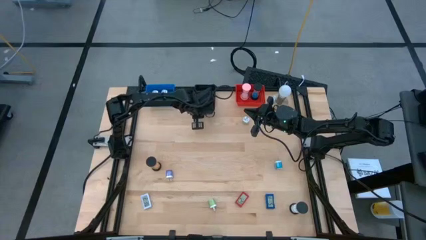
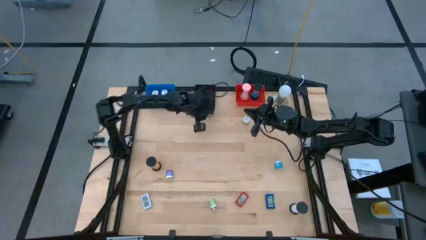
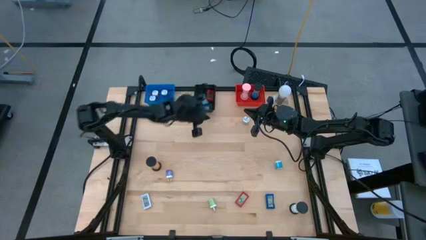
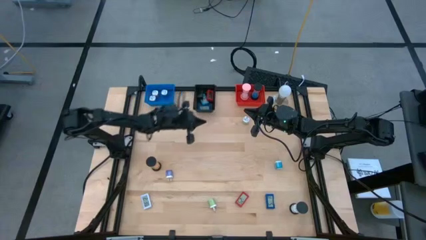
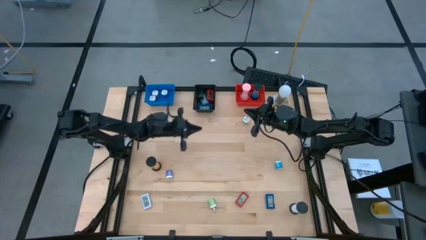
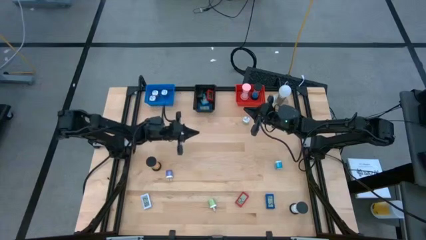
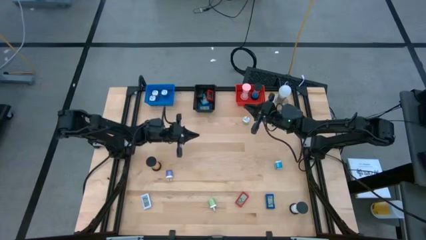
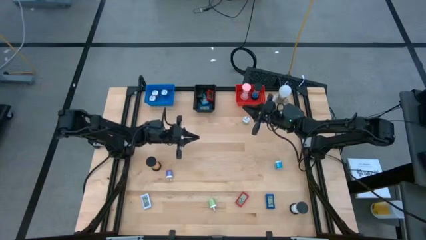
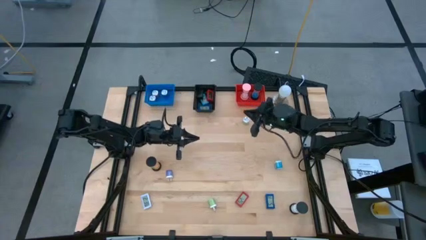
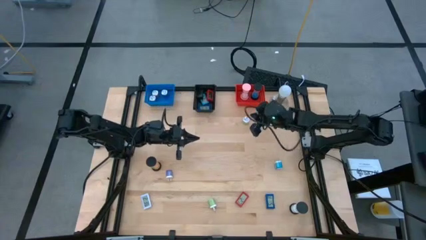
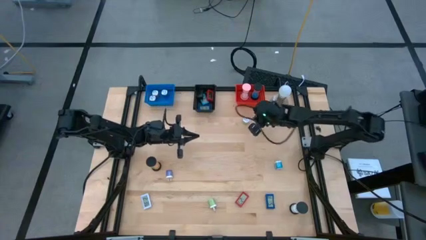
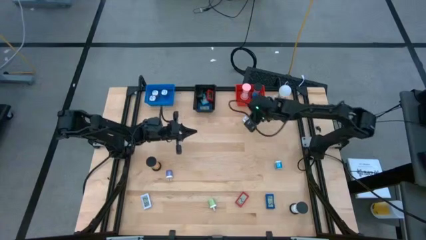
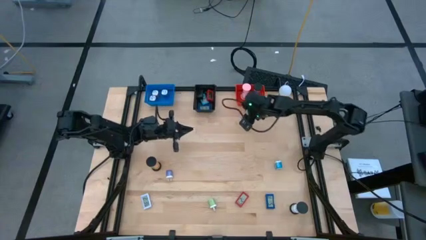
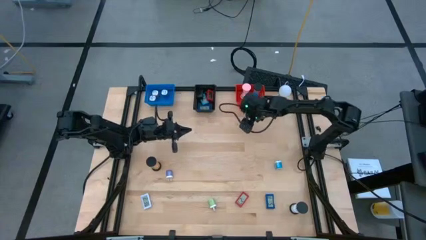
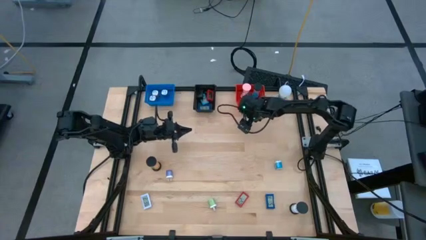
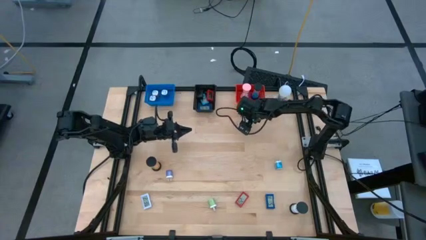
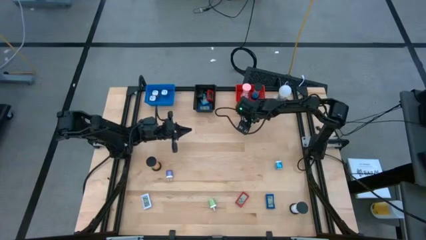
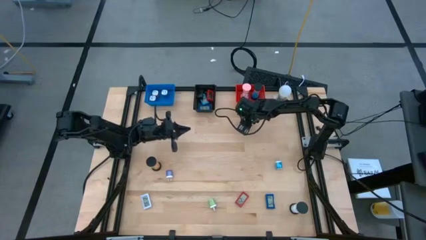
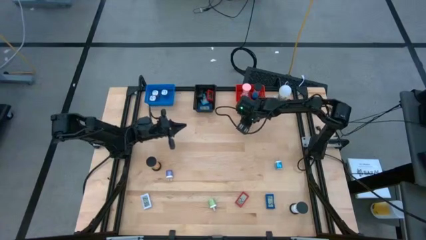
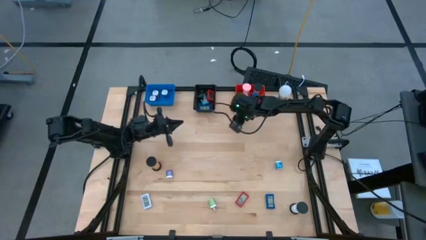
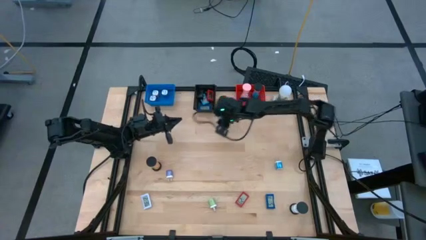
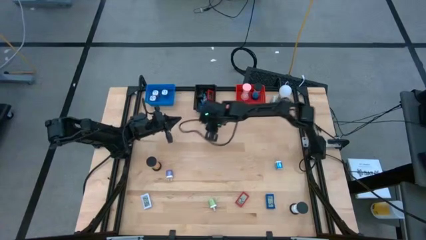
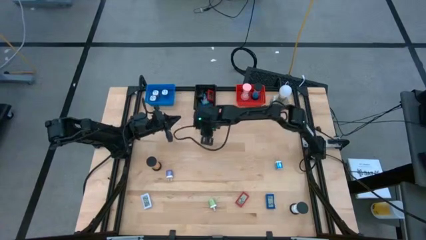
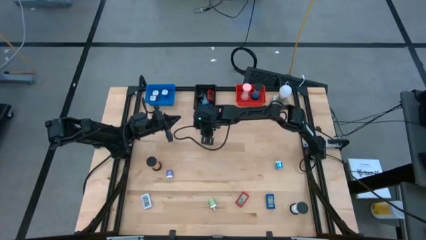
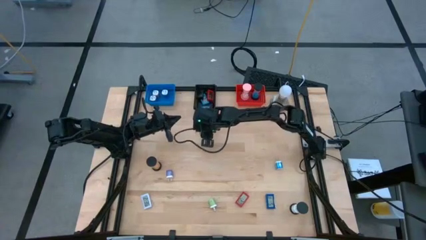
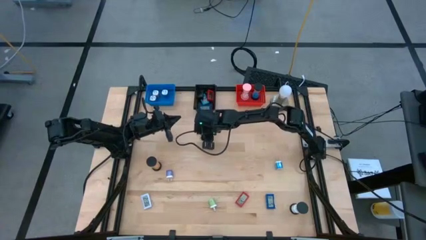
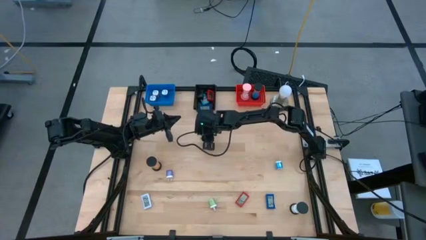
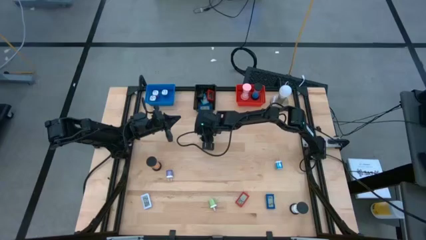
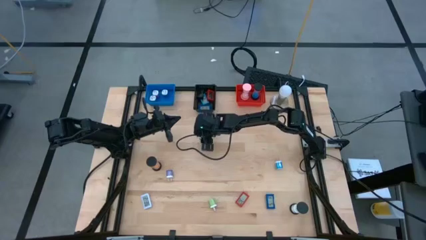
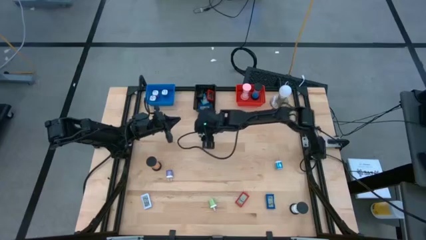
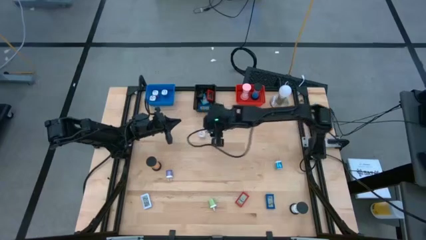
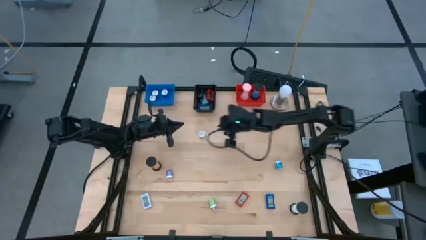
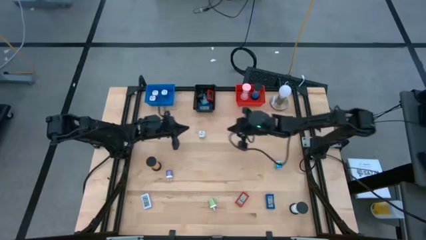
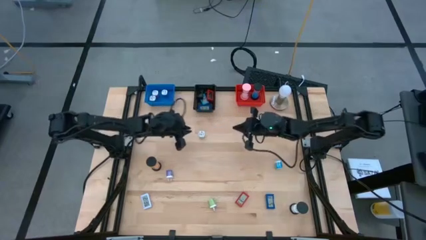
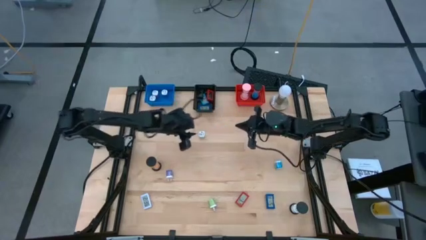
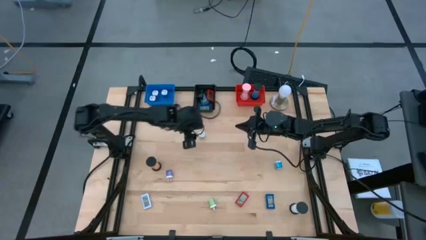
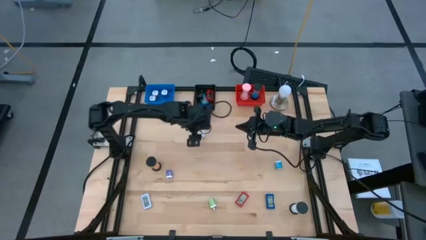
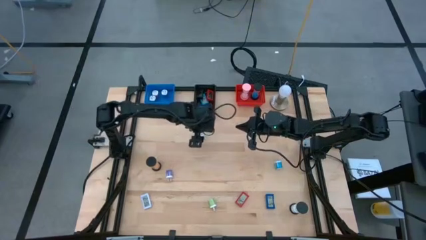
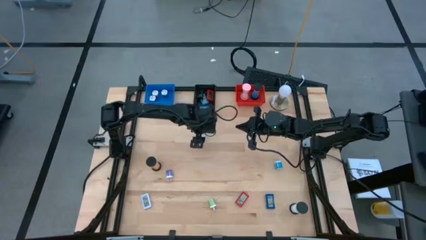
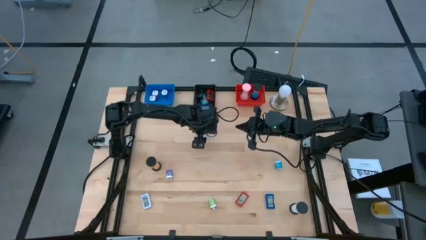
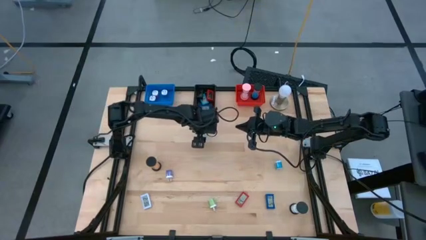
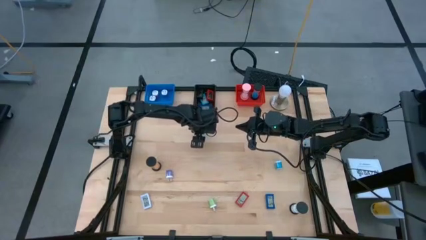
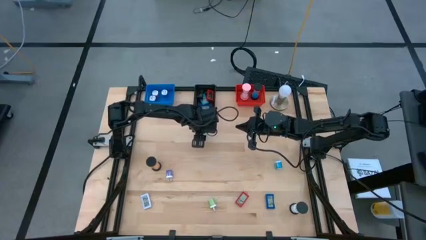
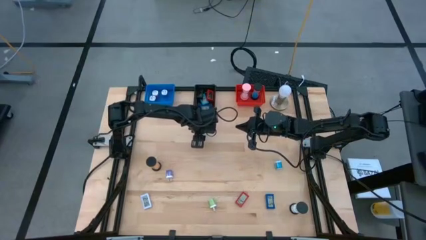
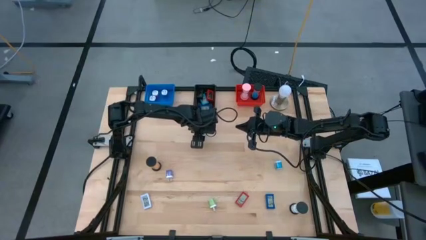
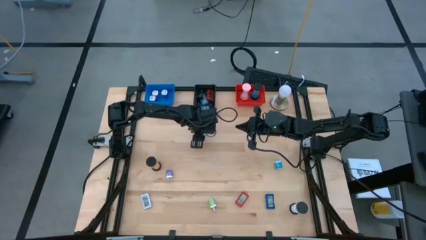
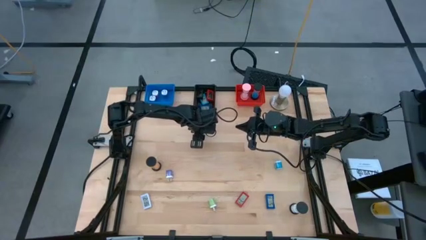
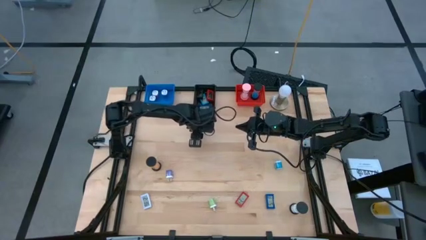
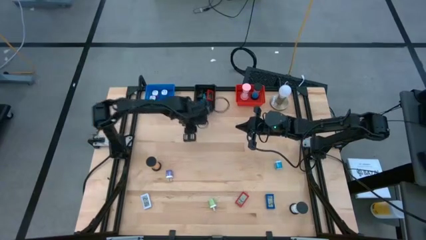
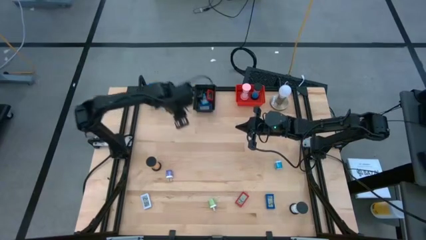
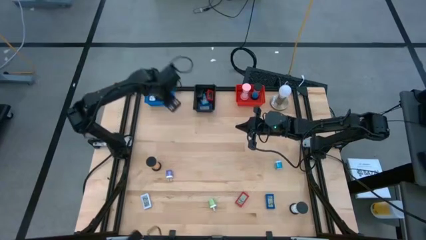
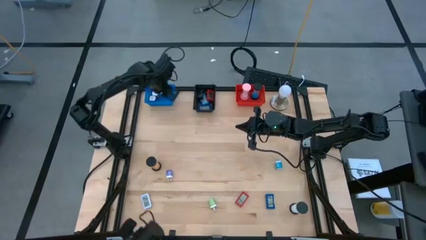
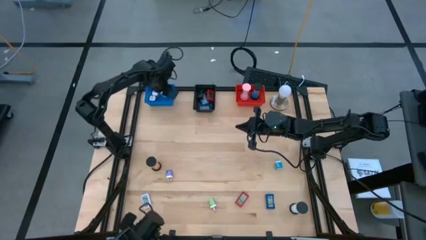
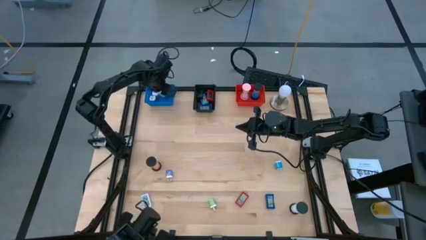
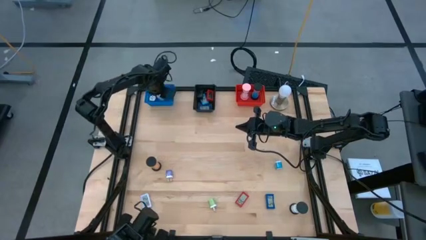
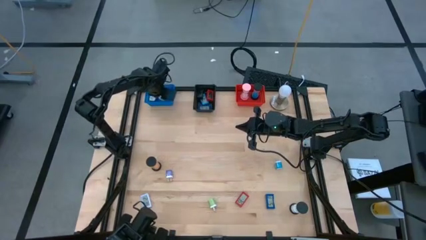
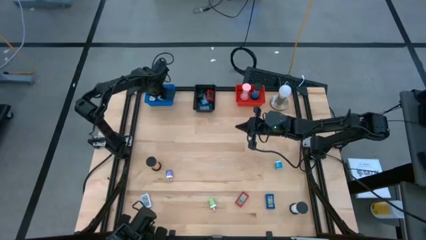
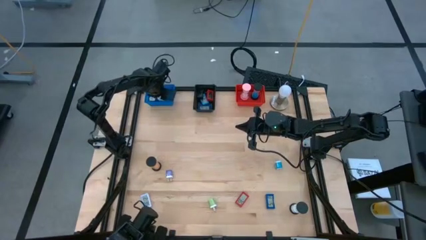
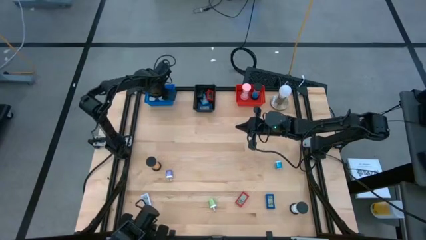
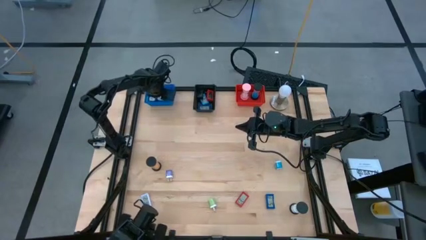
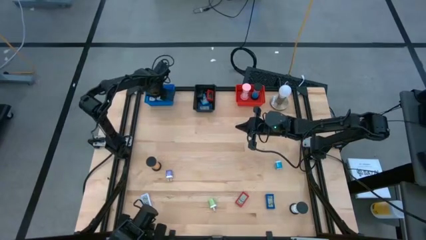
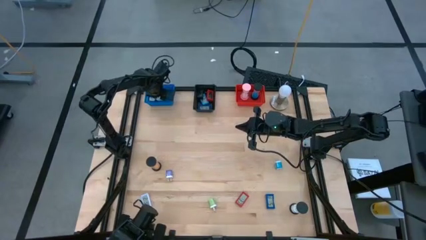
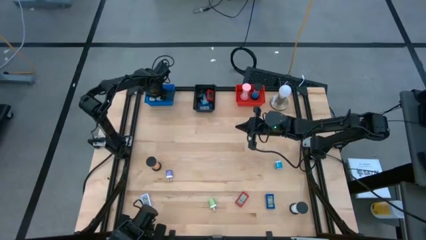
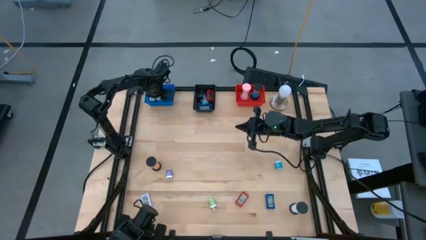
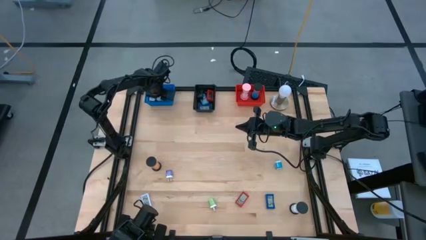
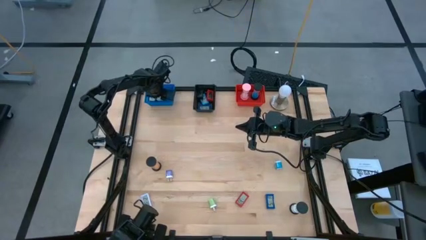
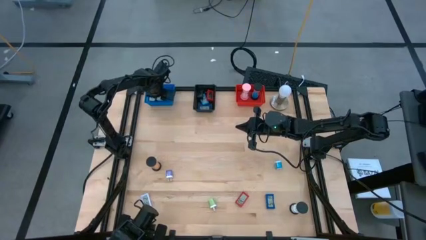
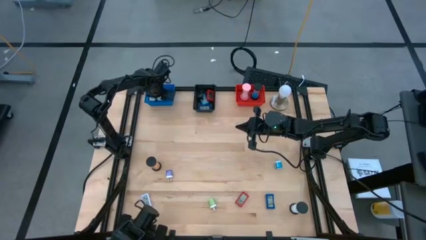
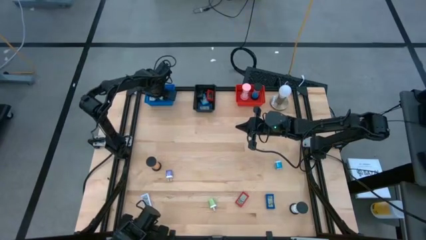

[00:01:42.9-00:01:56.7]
Task: Pick & Place Office items
Put the top green charger adapter into the blue bin
